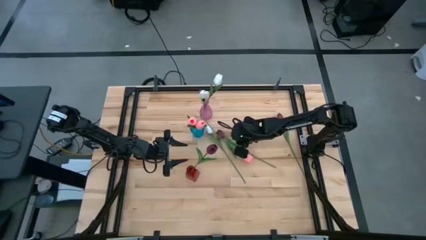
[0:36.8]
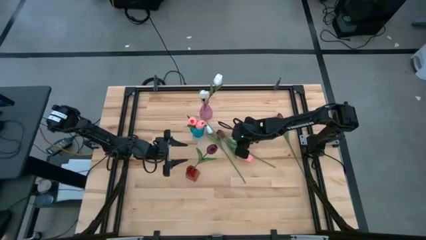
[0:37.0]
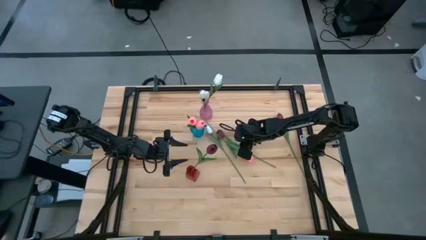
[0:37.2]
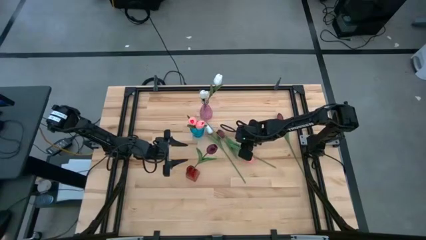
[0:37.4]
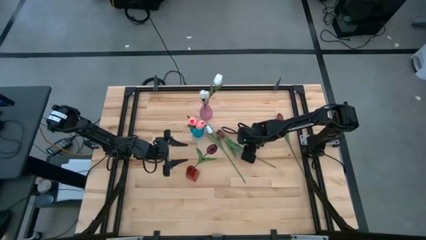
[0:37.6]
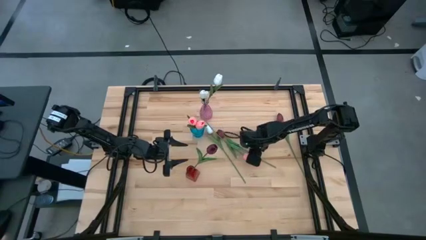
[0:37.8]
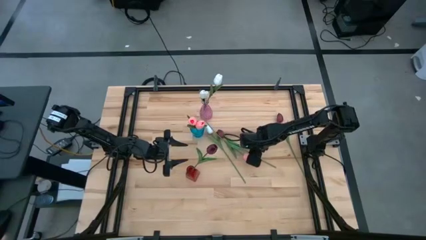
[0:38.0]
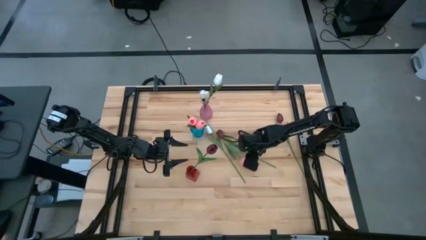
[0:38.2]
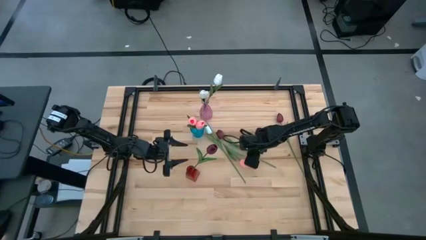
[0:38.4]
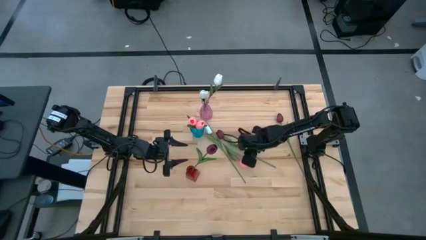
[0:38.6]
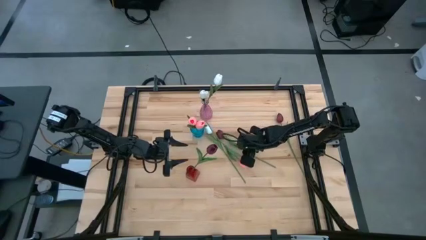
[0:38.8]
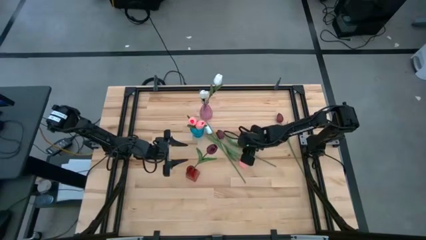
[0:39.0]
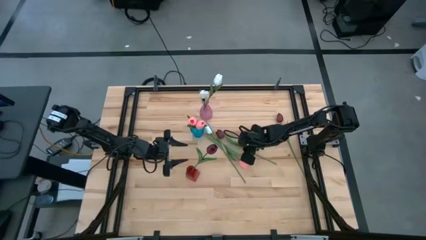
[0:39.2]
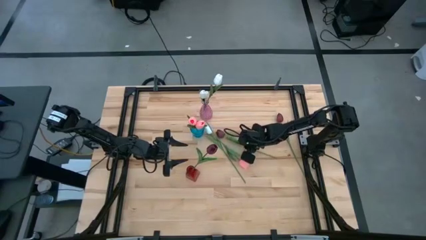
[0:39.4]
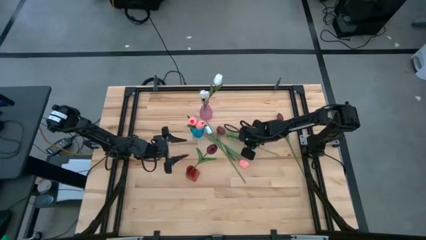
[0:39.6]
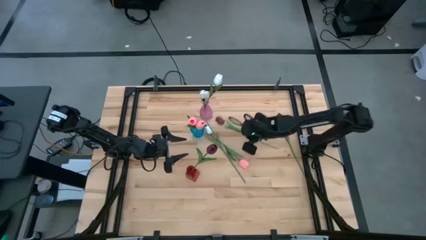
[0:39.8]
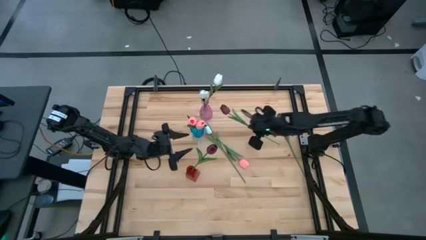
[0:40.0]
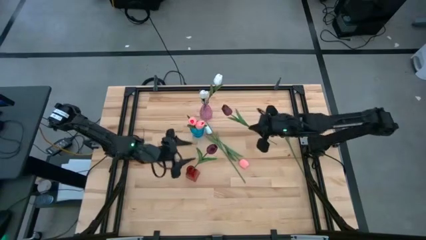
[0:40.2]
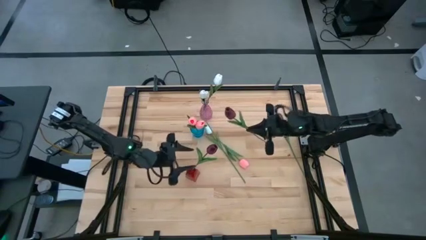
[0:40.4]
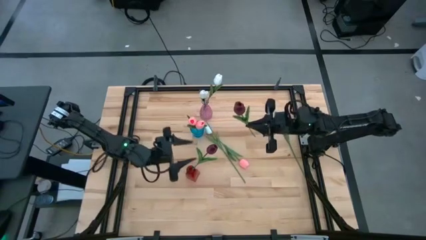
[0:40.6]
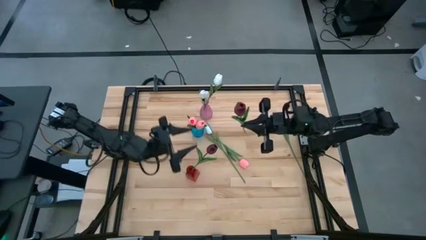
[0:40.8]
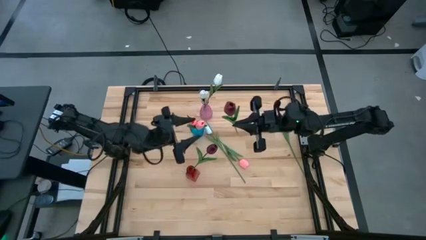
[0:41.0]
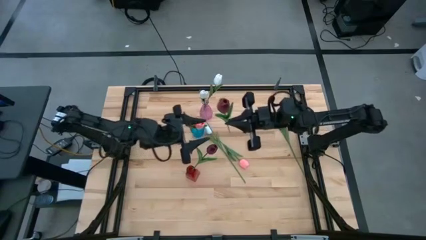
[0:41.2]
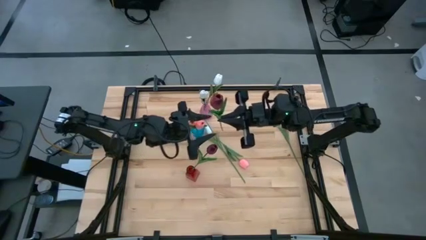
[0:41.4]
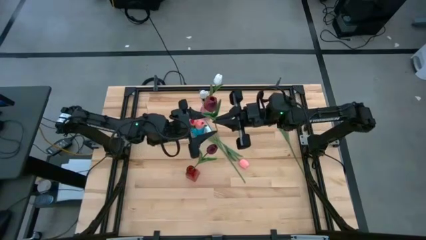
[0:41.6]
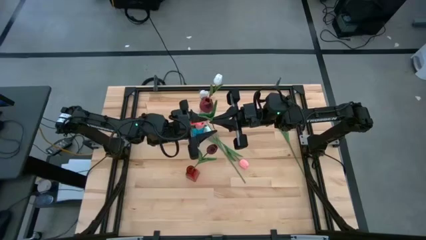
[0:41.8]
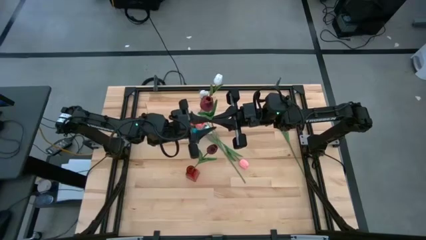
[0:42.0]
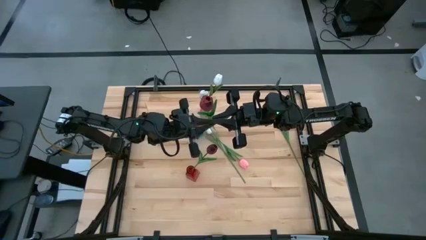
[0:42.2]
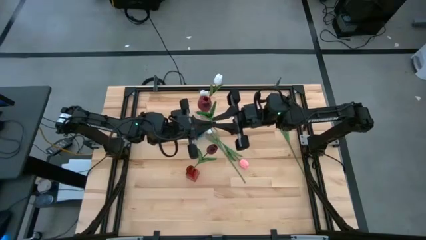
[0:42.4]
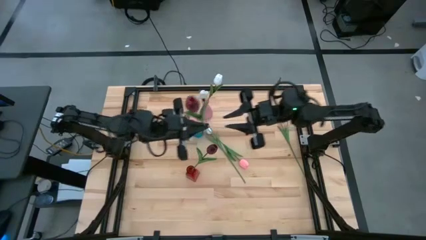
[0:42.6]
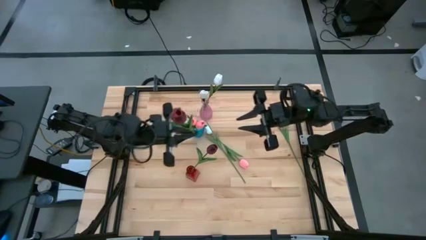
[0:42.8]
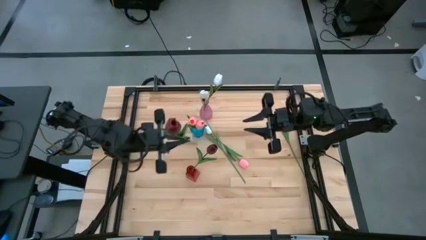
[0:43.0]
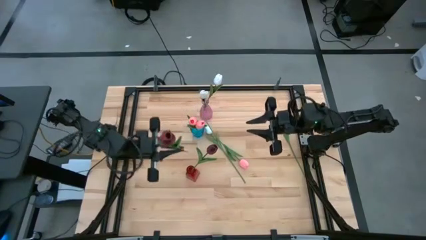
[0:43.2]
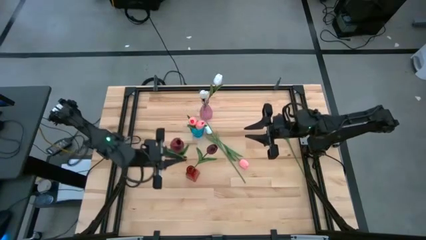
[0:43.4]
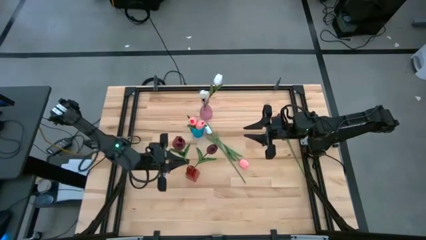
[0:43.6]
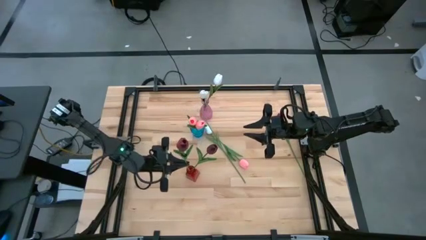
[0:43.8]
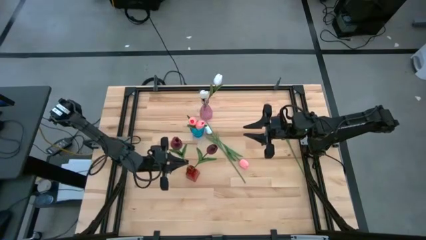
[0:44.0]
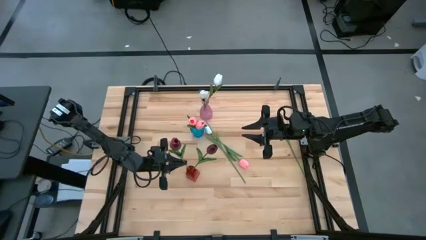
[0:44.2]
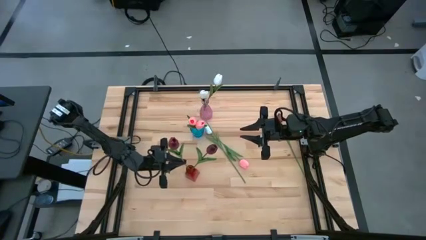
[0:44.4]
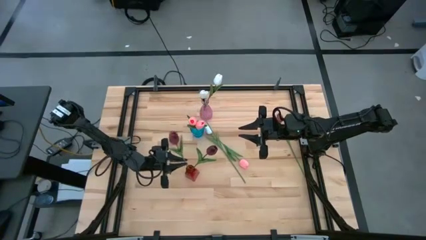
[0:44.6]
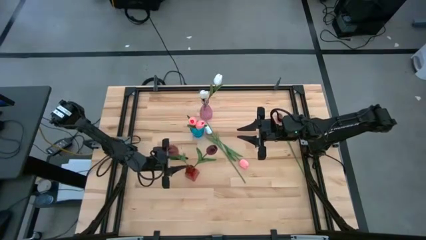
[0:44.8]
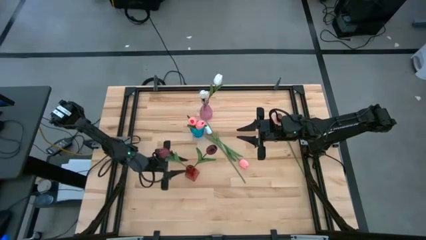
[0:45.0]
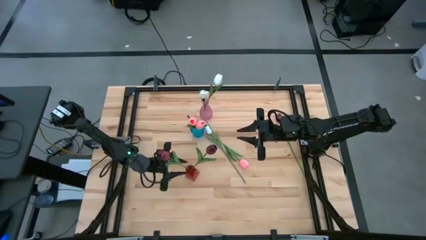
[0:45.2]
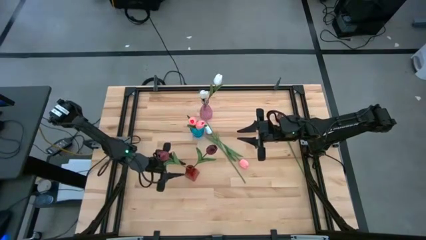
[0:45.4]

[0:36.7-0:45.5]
Task: Sort flowers into vase by color
Put the bottom red flower into the red vase

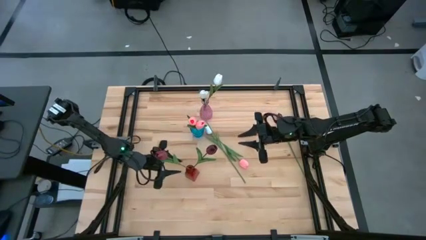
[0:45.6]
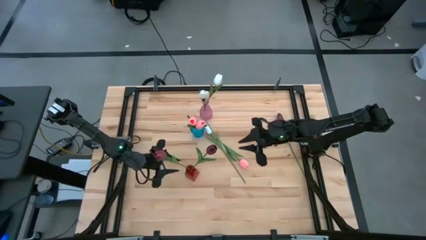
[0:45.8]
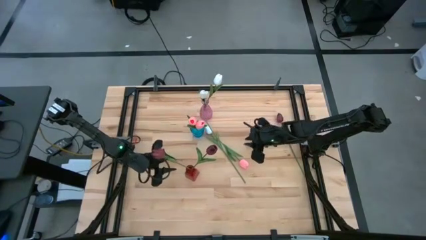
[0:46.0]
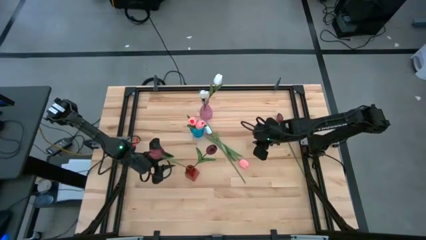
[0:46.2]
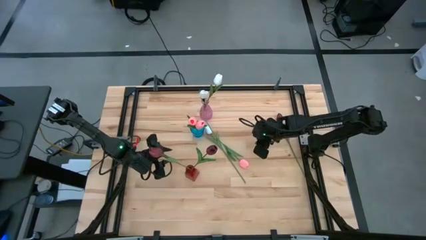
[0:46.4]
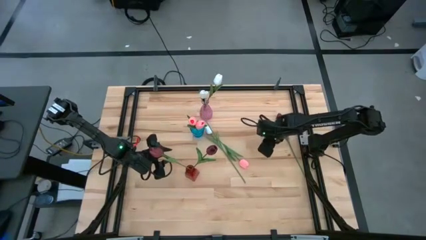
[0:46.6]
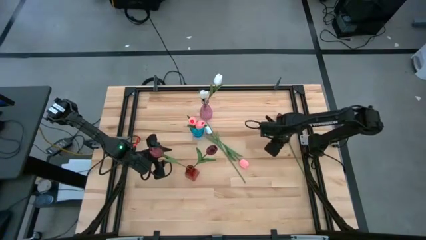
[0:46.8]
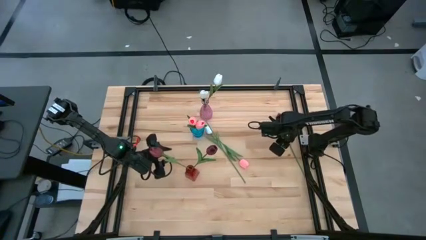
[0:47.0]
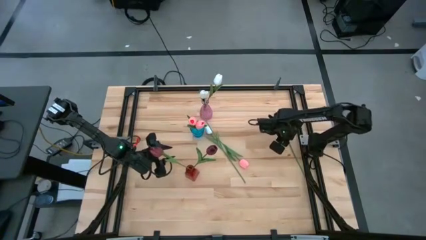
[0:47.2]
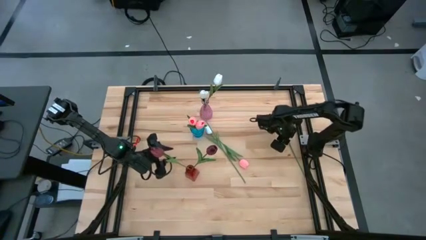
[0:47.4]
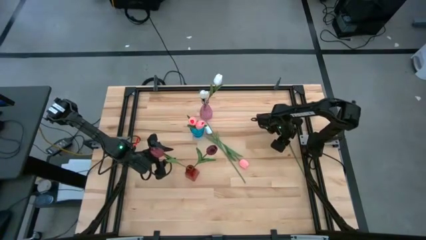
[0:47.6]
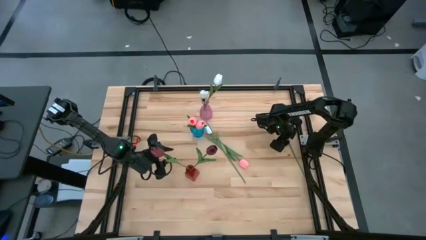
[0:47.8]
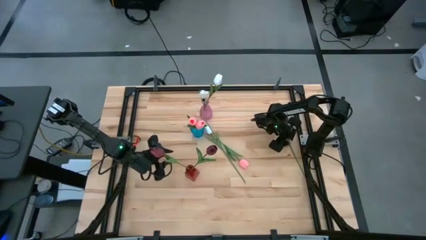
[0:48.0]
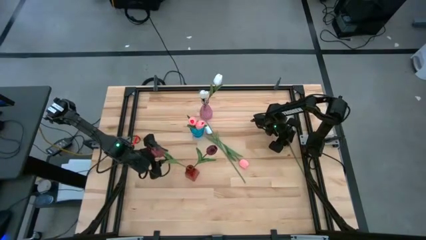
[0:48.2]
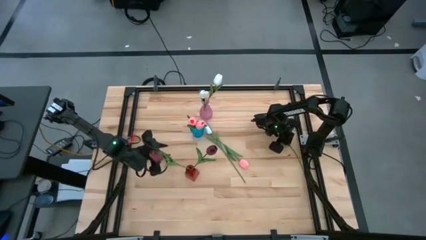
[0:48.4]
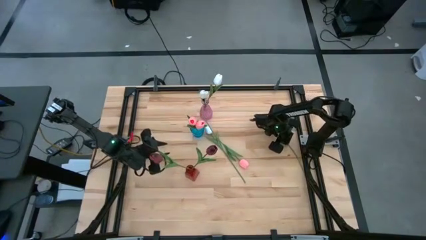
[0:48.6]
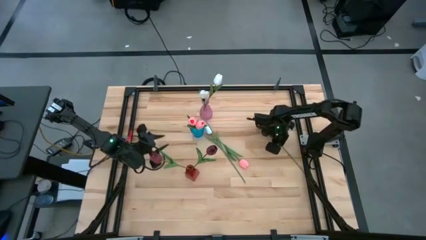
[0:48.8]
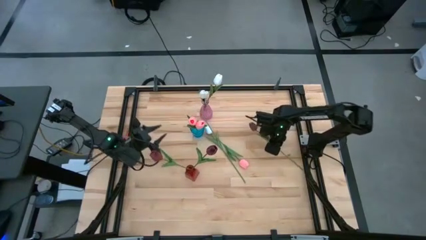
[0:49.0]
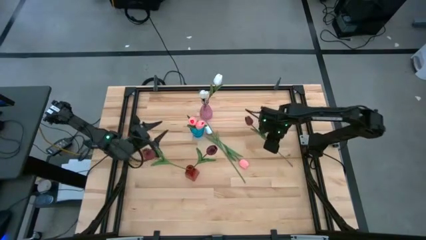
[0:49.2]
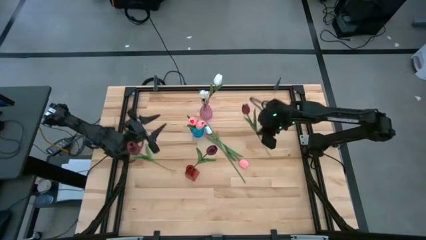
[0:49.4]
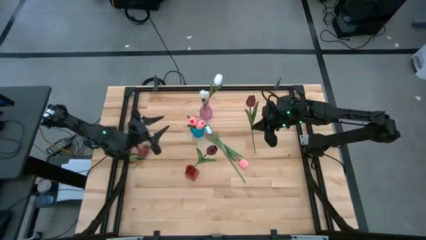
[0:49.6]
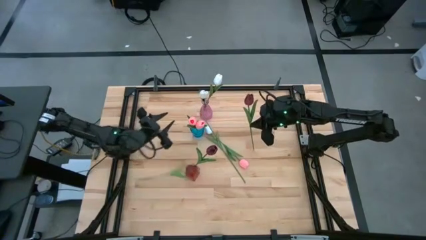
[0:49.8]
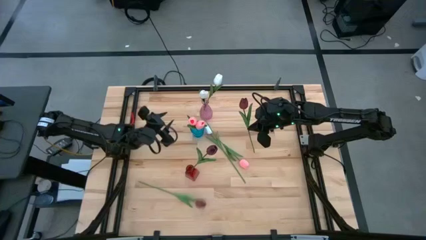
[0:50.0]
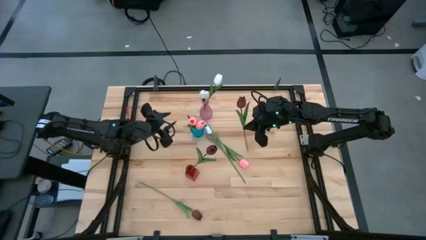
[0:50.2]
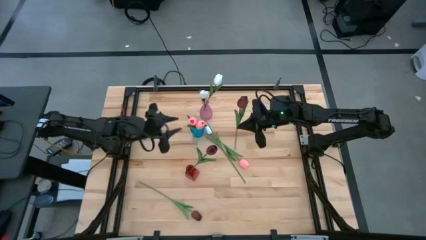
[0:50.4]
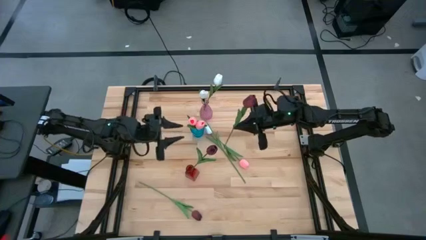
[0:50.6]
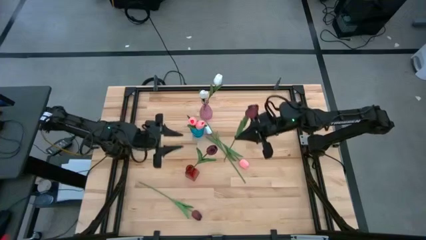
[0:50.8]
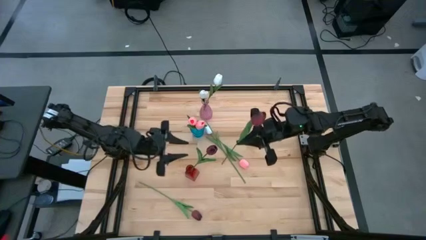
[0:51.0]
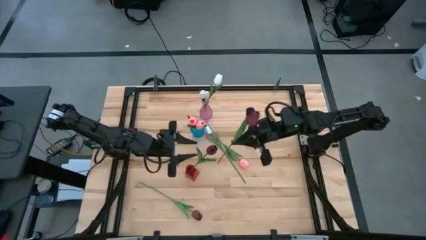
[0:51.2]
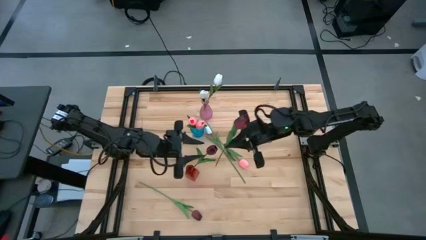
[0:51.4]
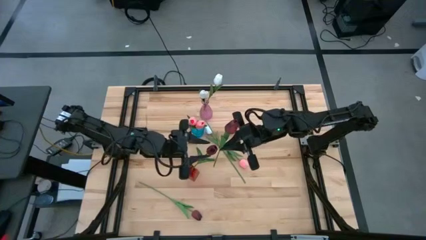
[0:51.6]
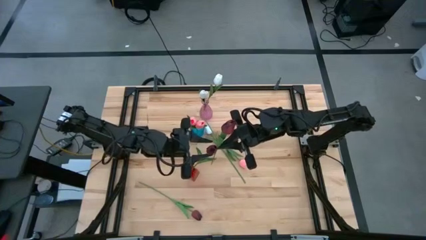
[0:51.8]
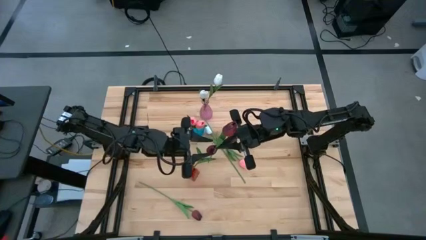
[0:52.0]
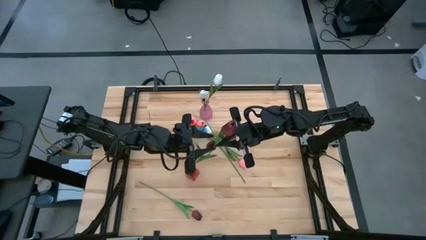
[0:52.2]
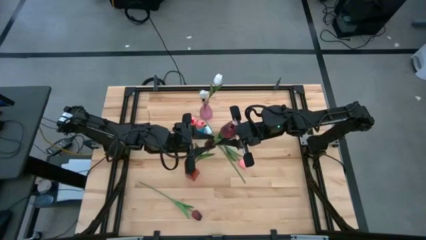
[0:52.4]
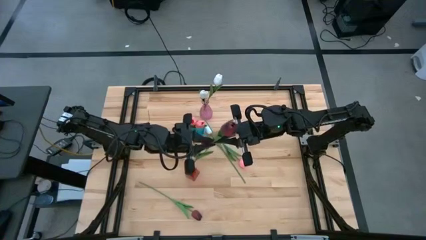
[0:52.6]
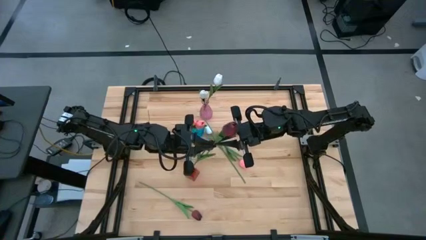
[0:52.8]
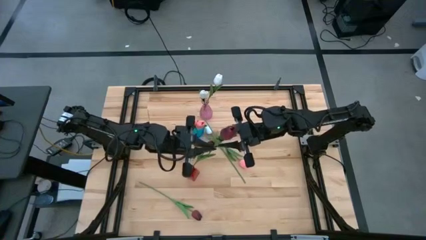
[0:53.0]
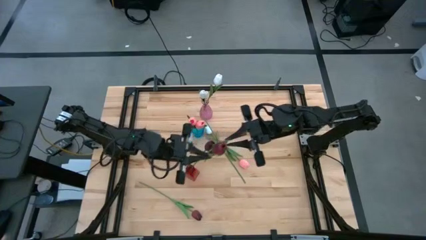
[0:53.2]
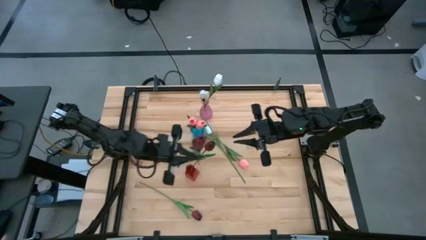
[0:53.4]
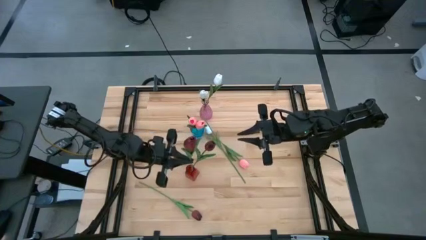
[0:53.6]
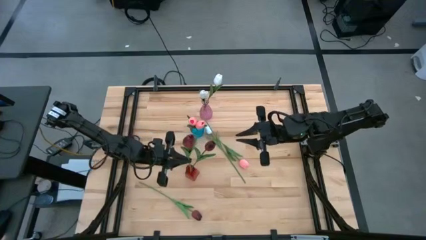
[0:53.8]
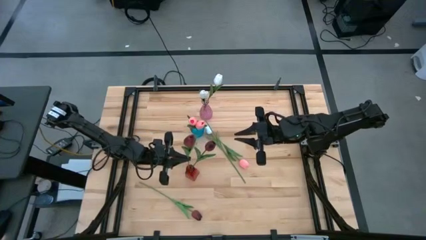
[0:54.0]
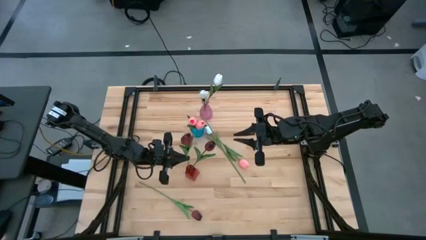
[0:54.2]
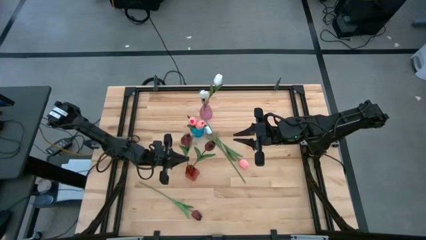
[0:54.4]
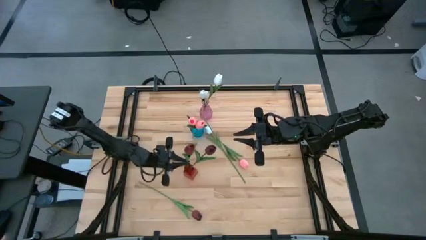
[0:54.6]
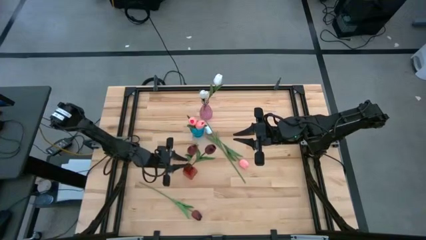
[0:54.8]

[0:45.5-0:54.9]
Put the red flower into the red vase
